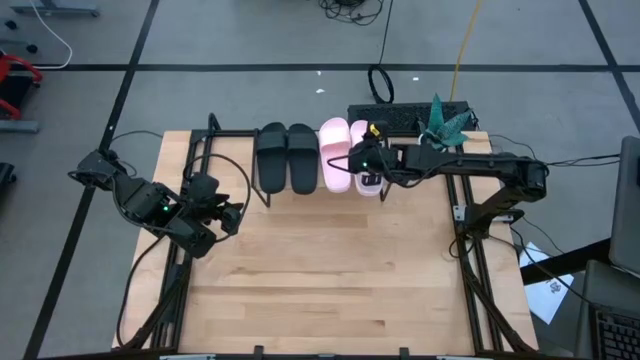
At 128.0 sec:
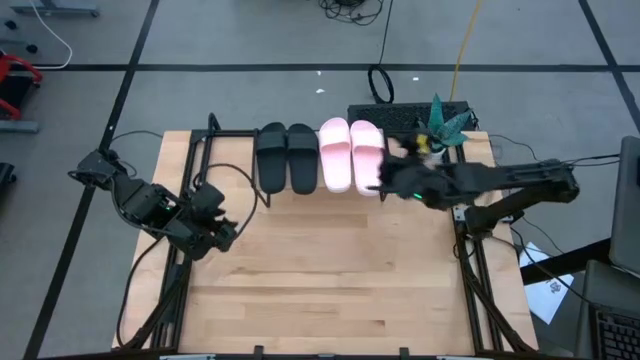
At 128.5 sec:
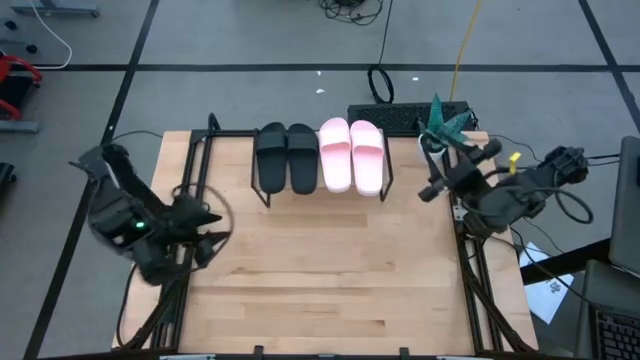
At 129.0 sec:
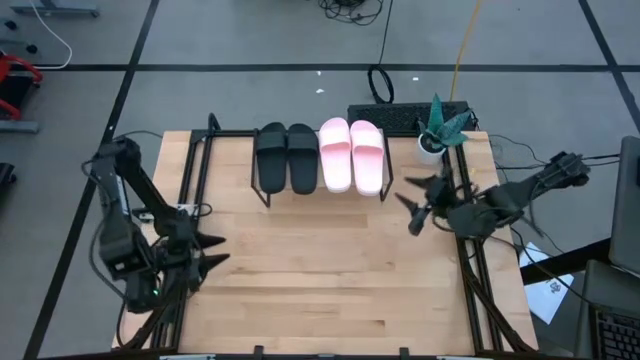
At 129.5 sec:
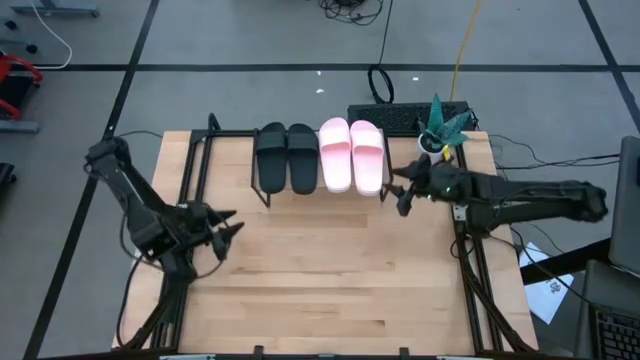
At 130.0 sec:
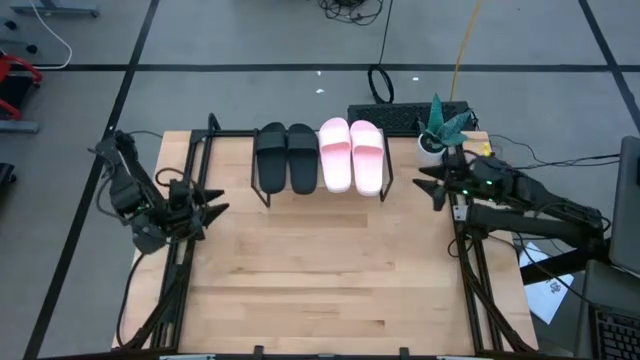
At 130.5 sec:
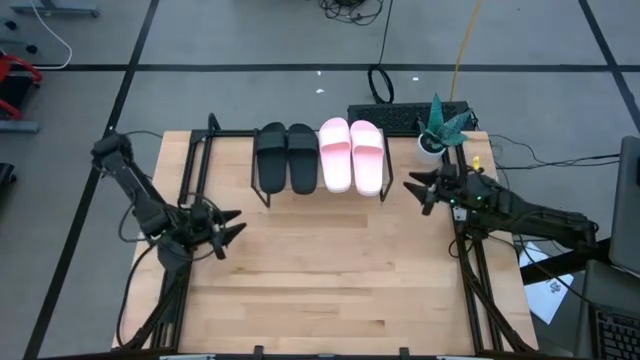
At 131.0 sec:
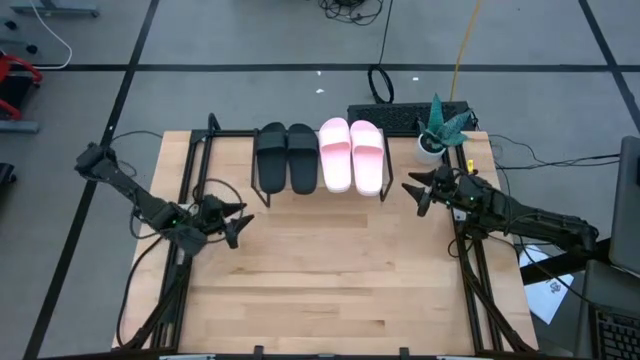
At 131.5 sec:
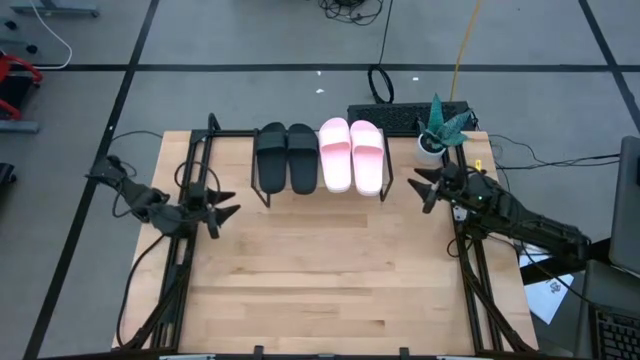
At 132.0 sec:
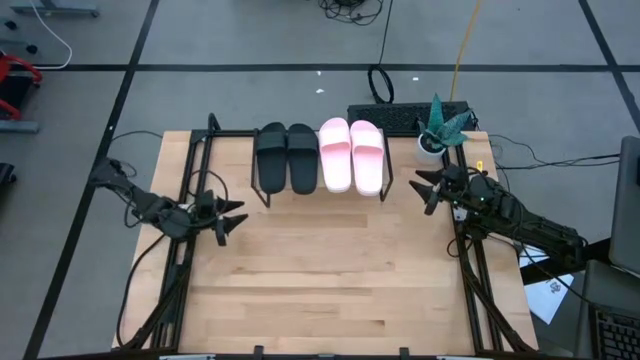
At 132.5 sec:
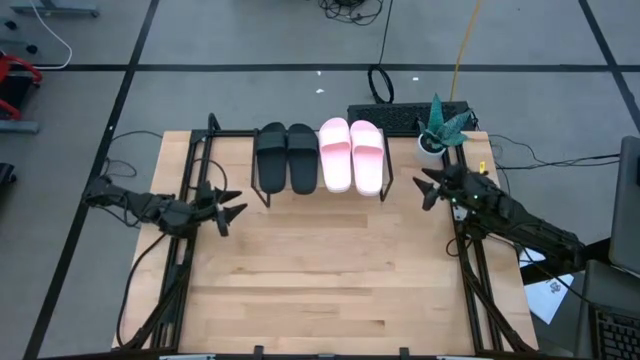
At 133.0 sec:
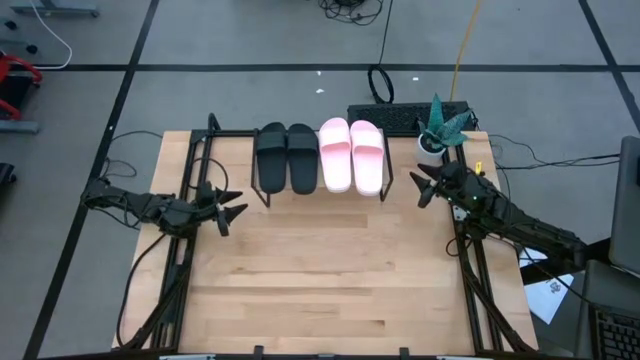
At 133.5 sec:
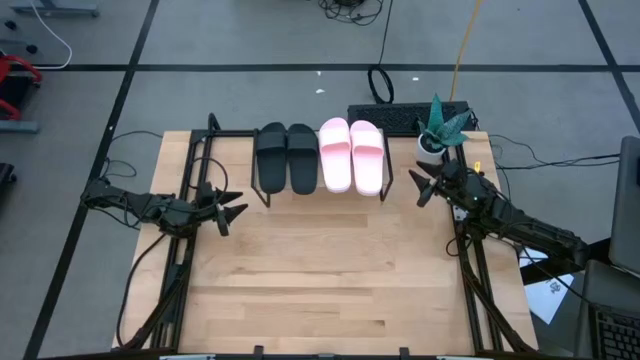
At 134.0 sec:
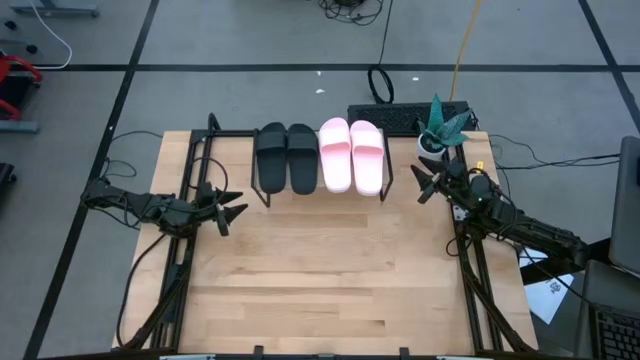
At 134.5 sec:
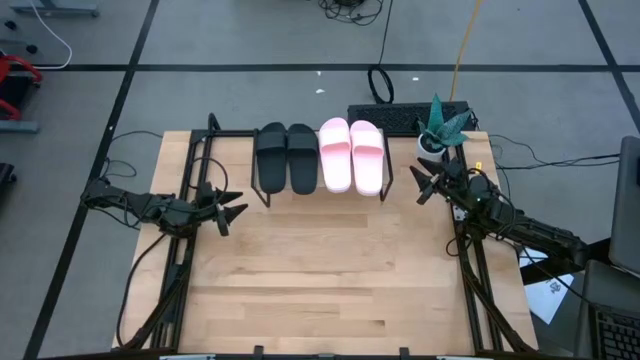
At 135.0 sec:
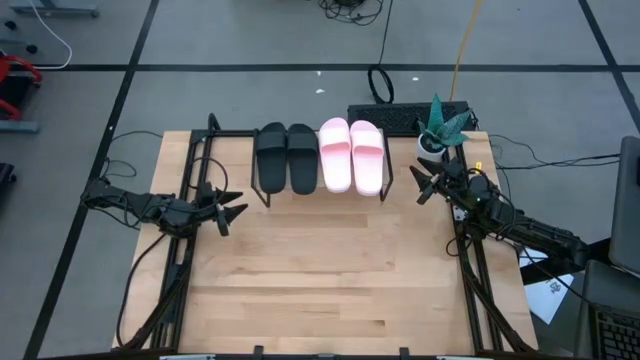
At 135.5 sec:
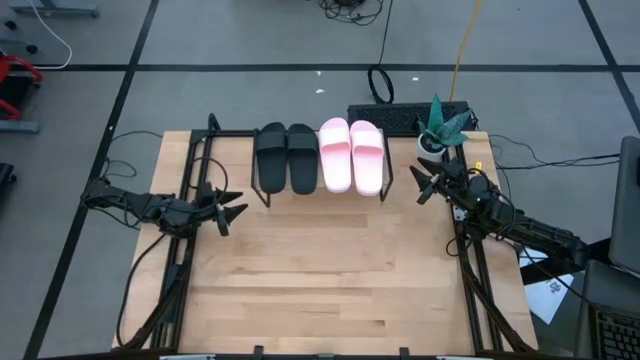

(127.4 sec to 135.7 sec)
Task: Pick and place slides into the shelf
Return to Home Position

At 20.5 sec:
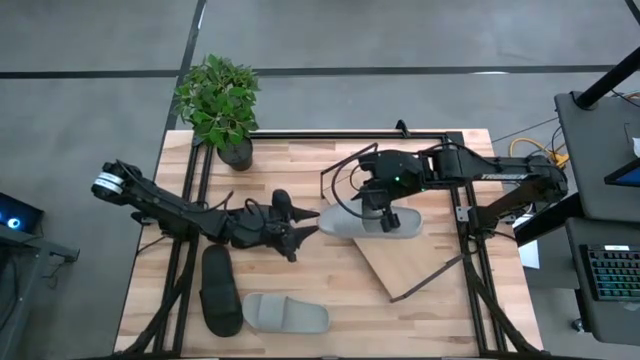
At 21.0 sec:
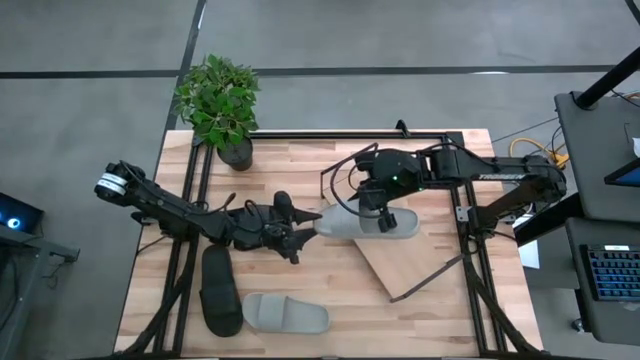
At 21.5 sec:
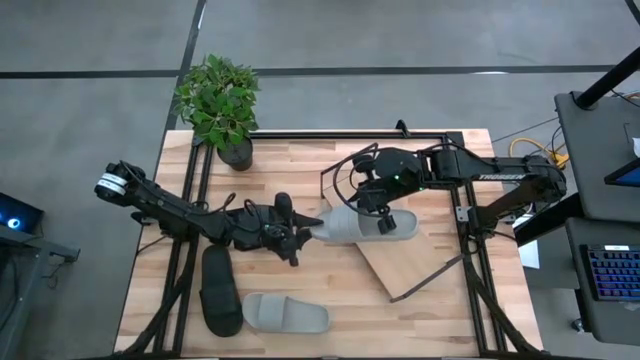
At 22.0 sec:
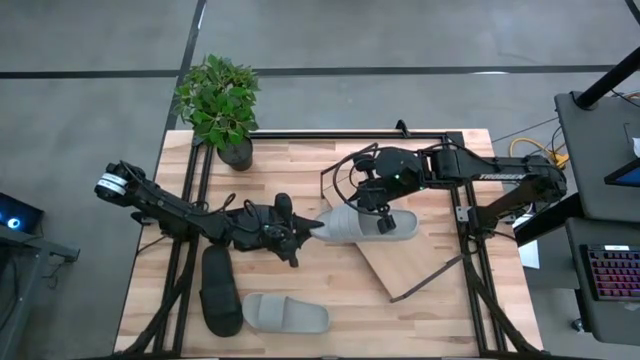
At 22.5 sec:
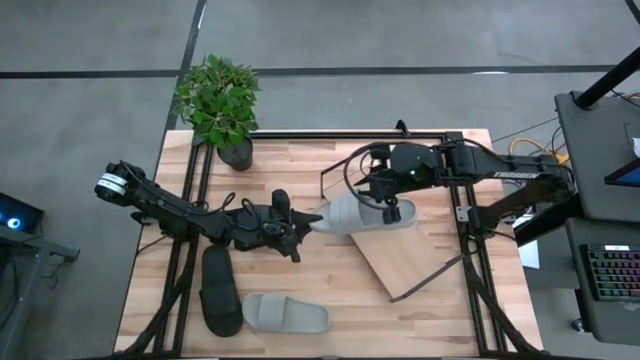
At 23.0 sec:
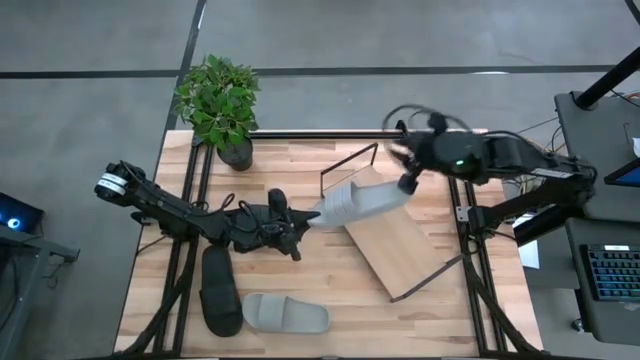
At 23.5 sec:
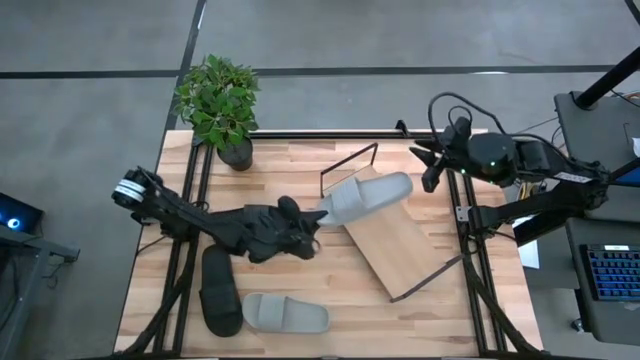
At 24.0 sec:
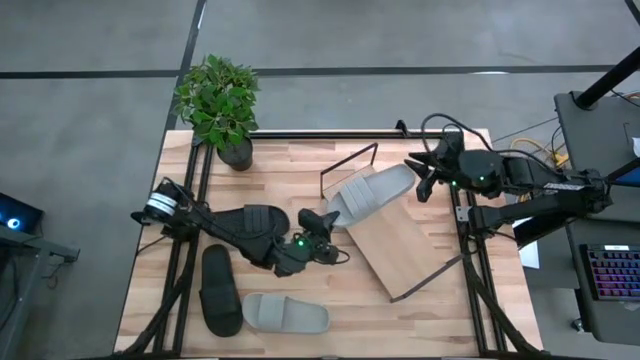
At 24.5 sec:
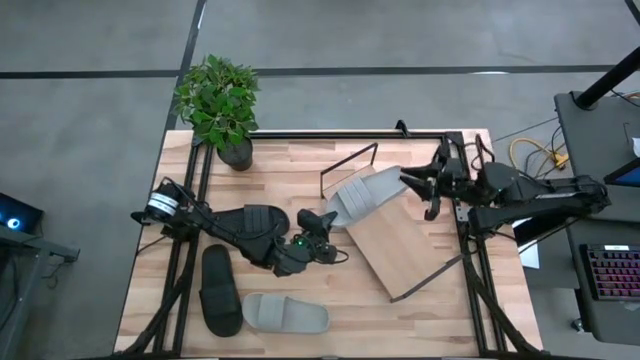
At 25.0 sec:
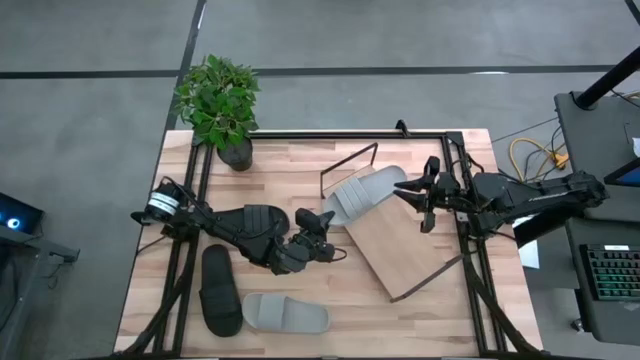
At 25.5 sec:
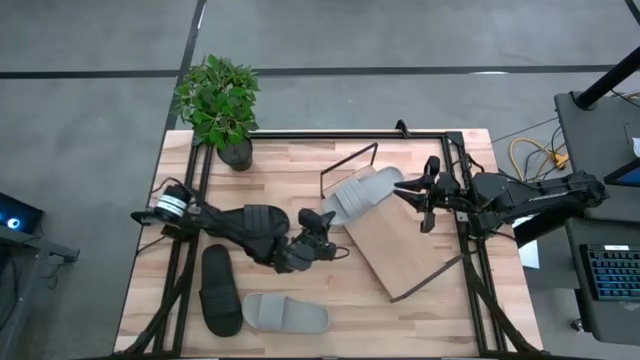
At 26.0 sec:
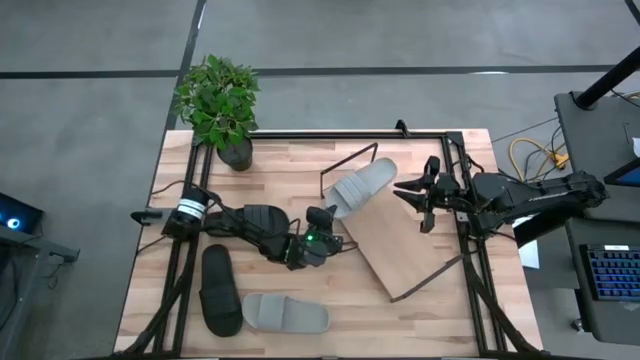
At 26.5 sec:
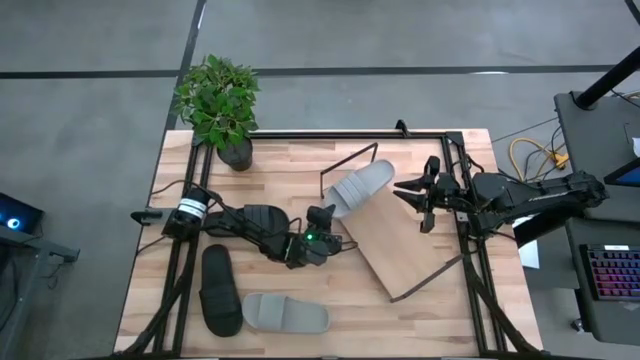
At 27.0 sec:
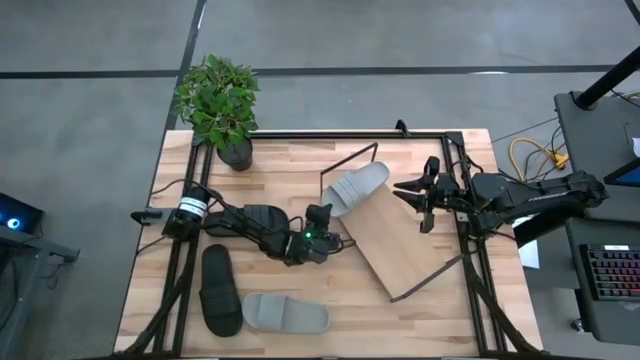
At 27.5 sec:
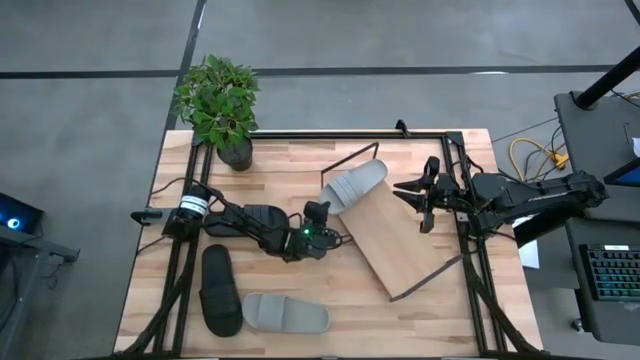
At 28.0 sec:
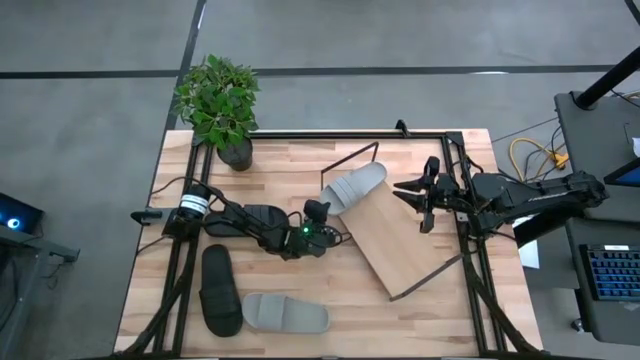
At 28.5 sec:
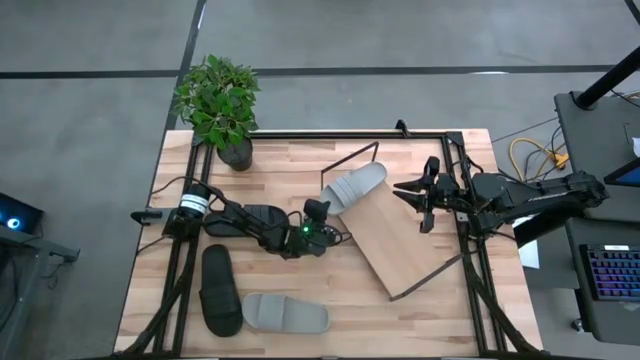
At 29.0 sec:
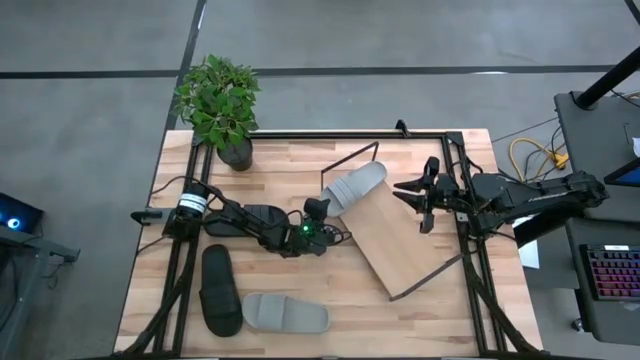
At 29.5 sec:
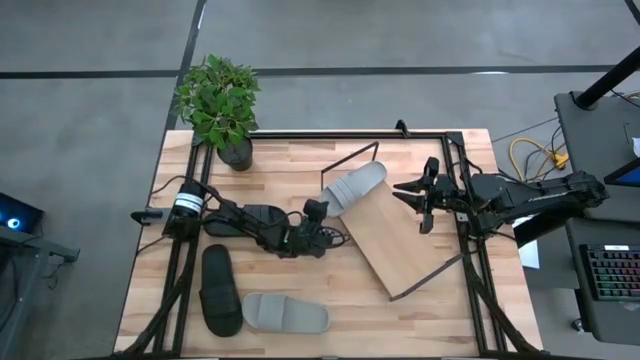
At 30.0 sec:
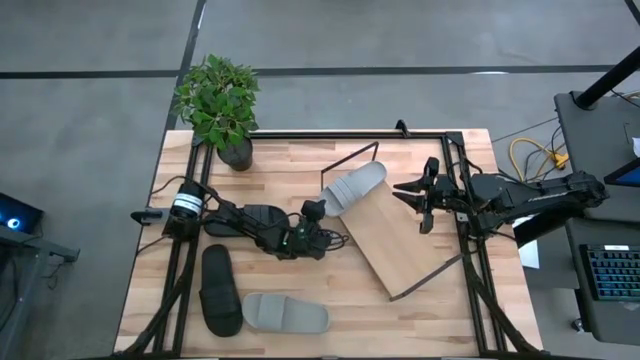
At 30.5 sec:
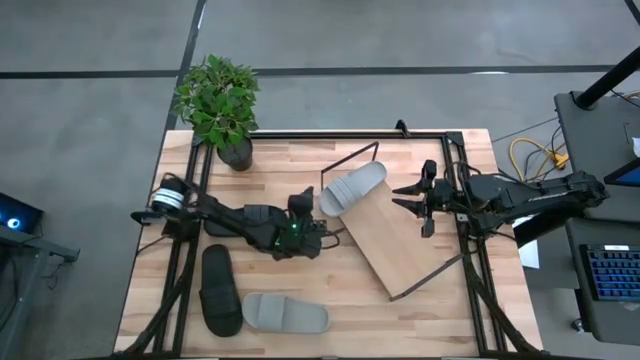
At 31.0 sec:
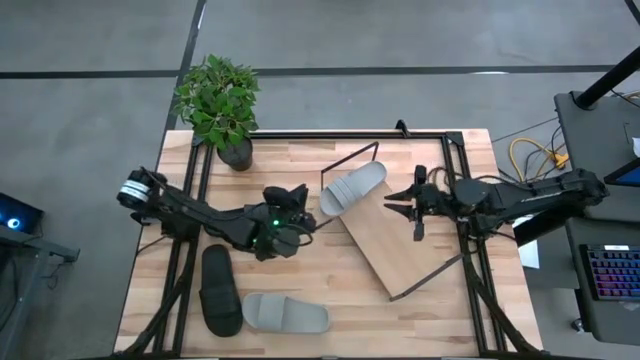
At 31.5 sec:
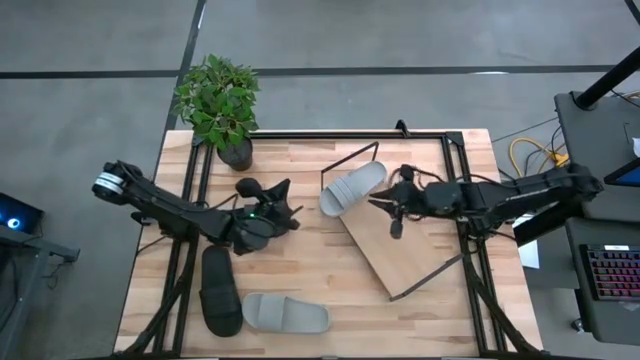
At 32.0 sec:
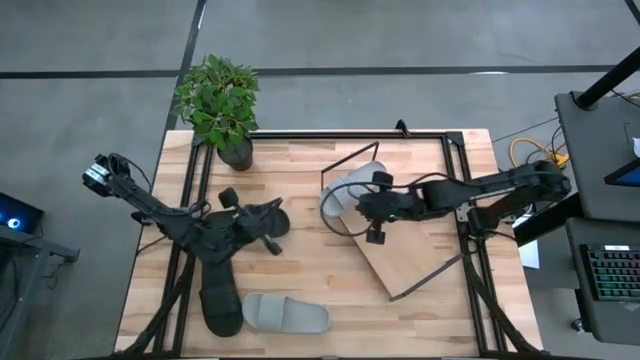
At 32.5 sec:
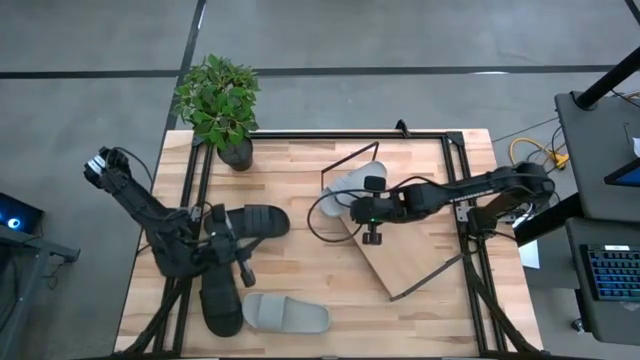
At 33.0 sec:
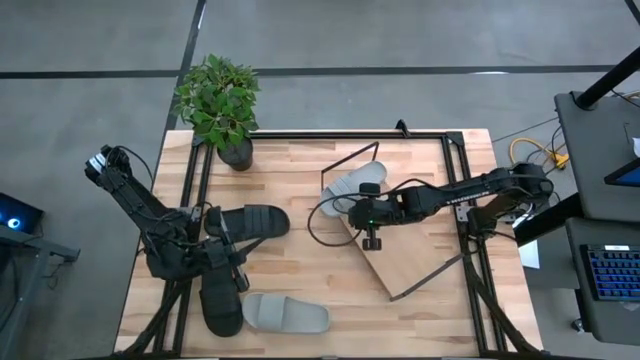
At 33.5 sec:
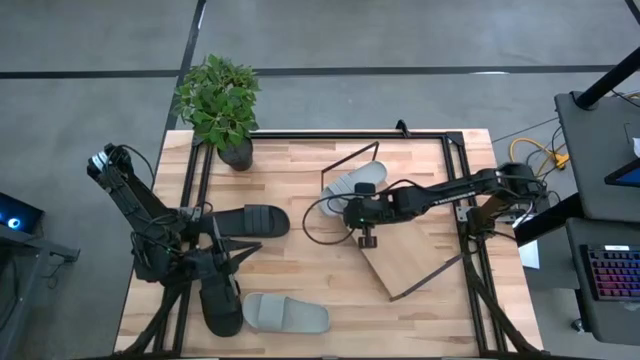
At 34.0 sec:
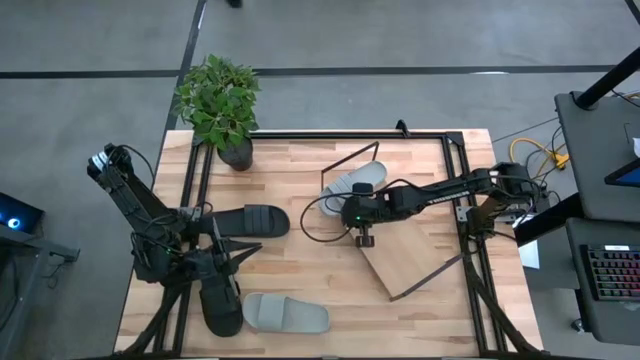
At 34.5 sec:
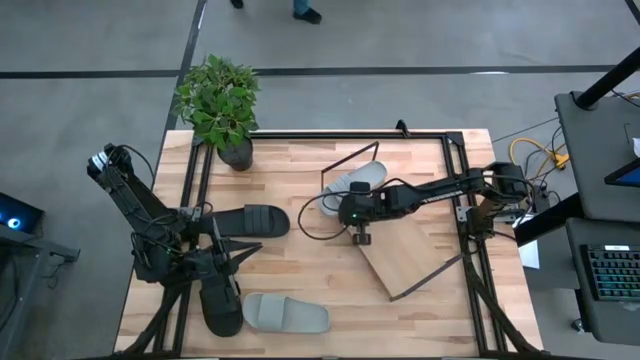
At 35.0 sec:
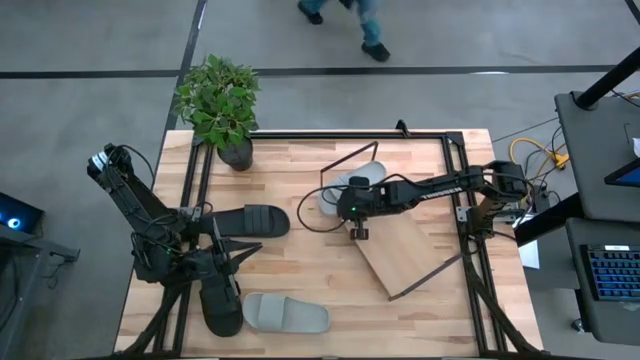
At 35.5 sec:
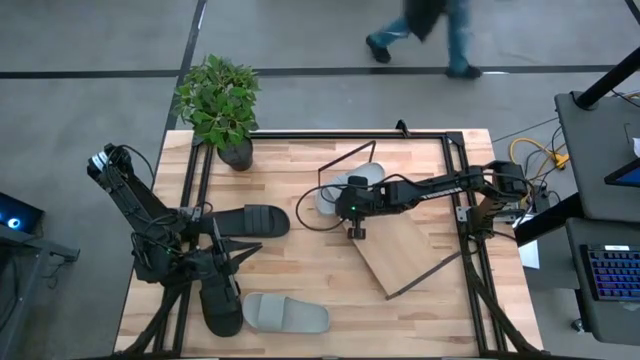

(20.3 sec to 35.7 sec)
Task: Pick and place slides into the shelf
Put the top gray slide on the shelf
